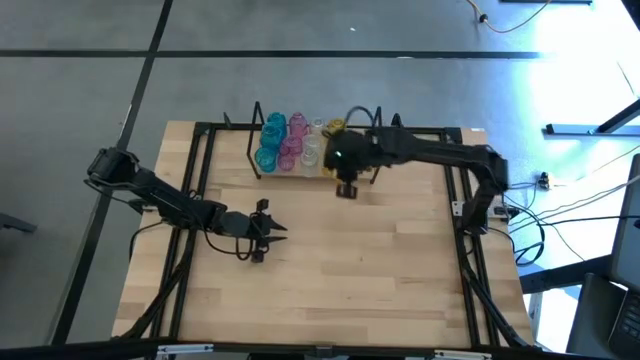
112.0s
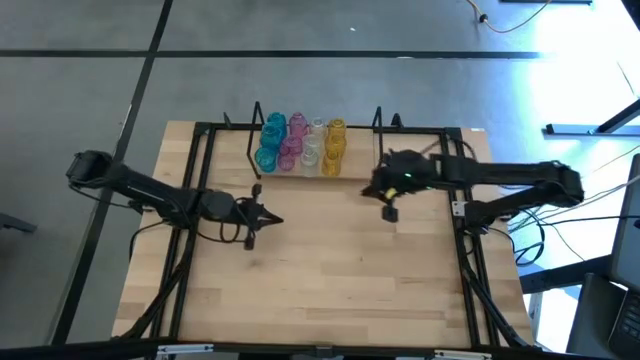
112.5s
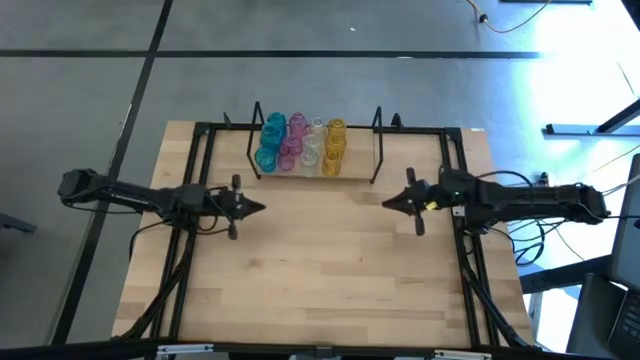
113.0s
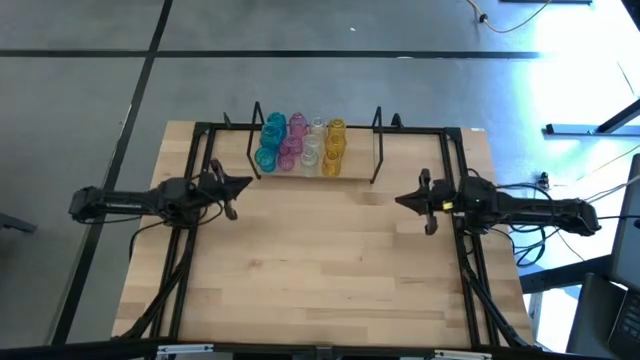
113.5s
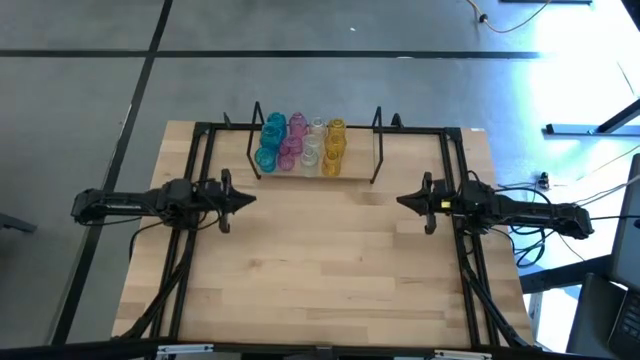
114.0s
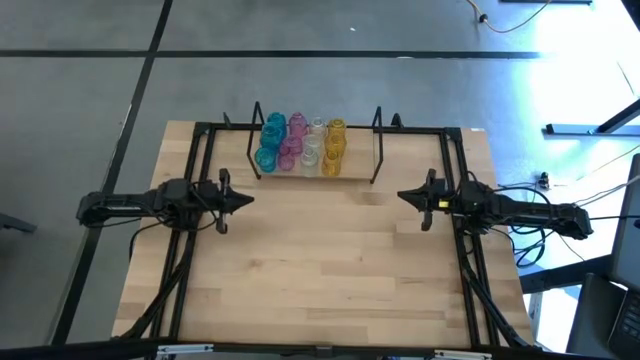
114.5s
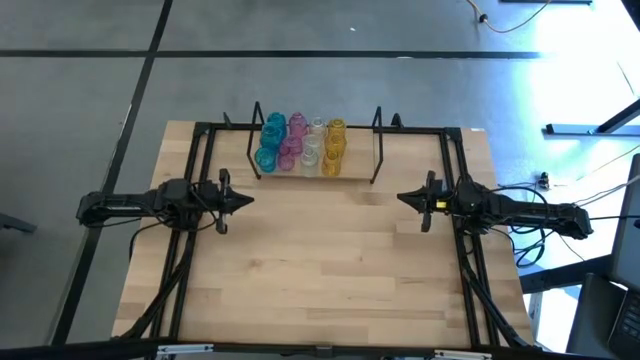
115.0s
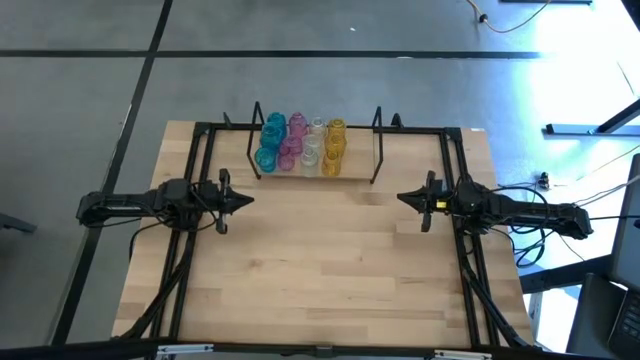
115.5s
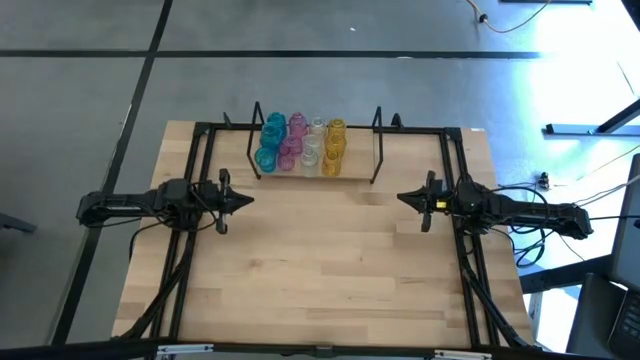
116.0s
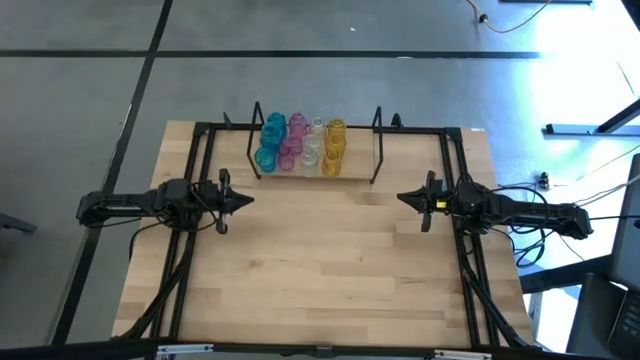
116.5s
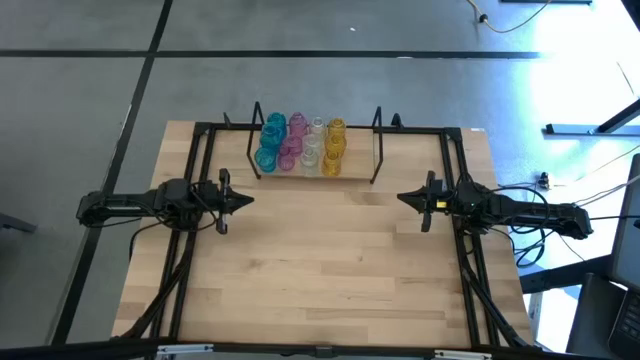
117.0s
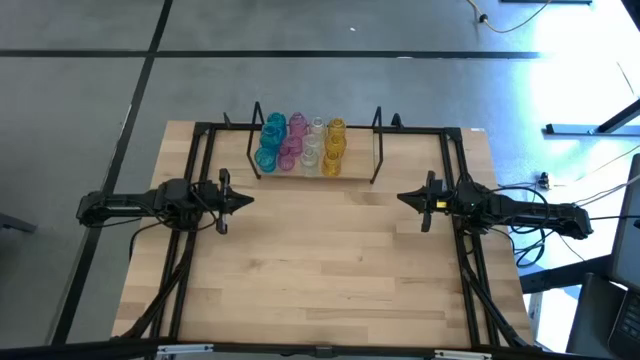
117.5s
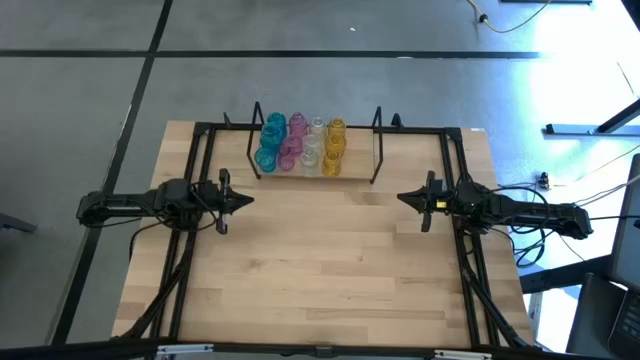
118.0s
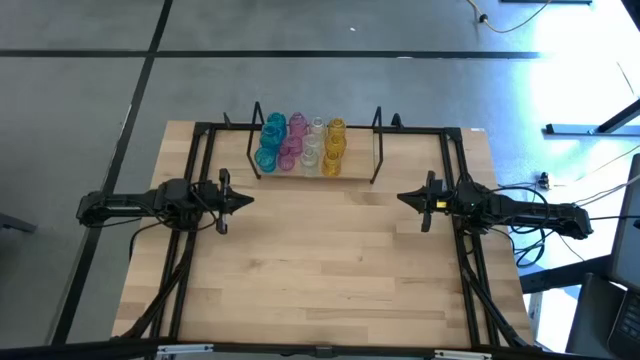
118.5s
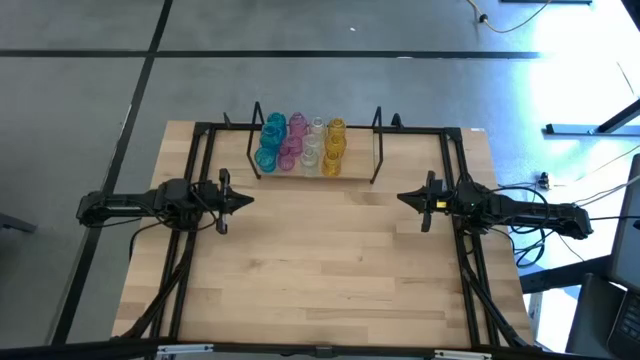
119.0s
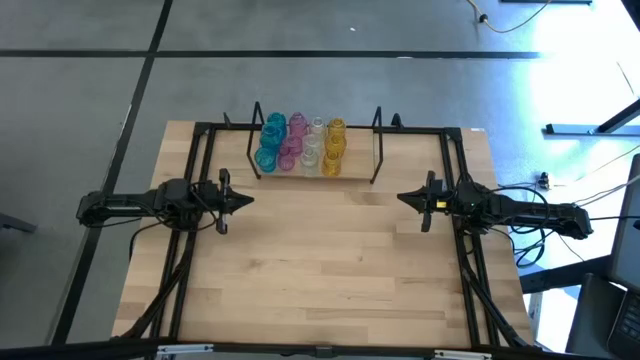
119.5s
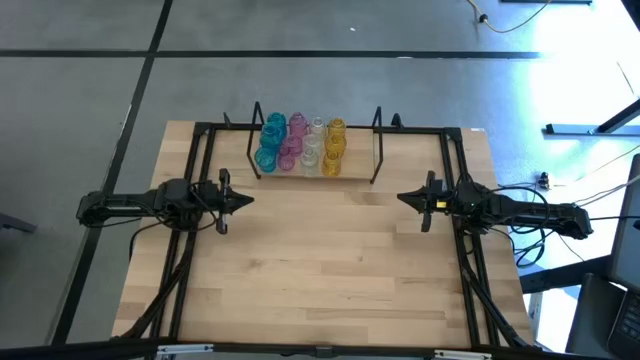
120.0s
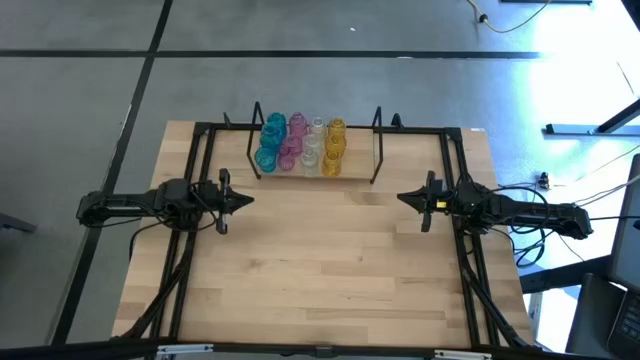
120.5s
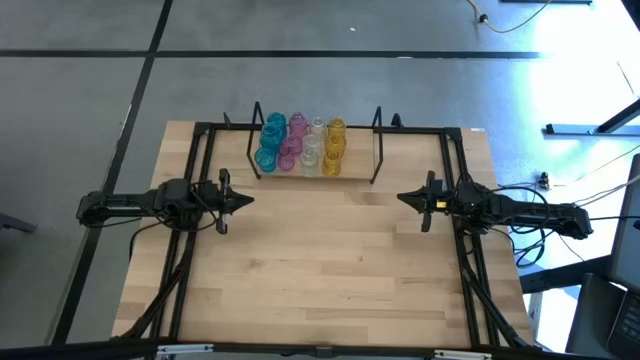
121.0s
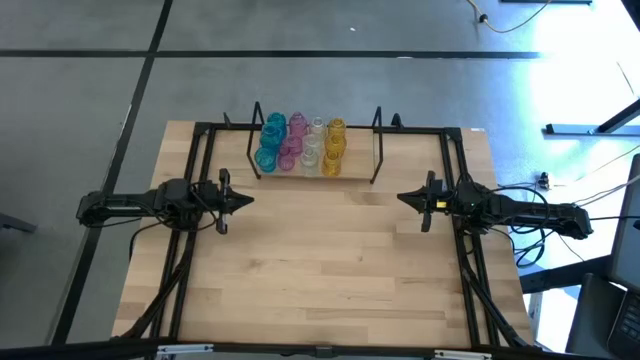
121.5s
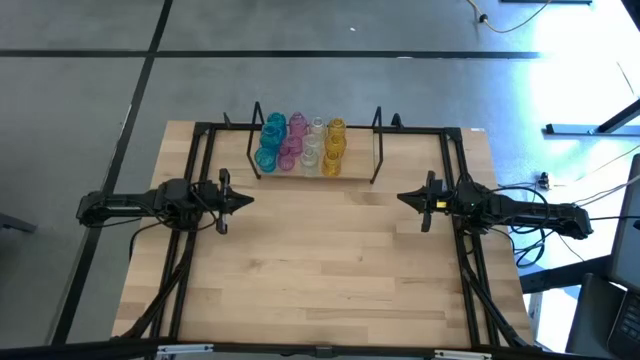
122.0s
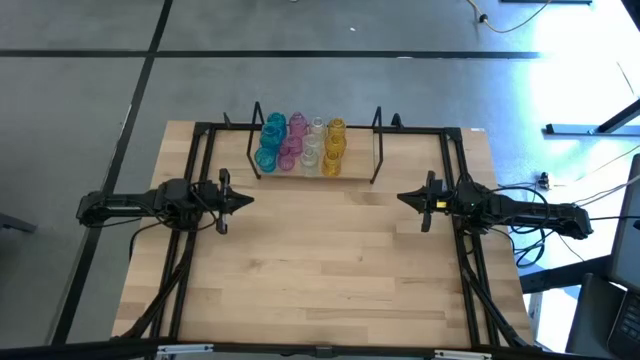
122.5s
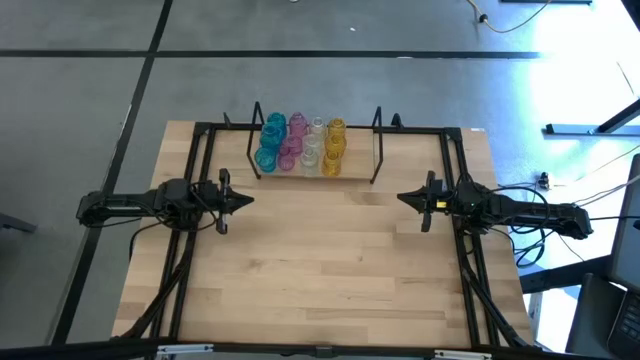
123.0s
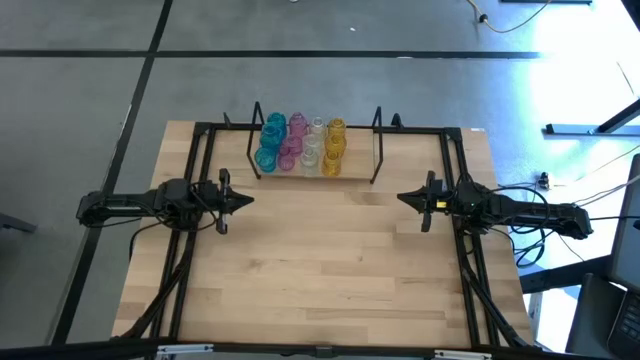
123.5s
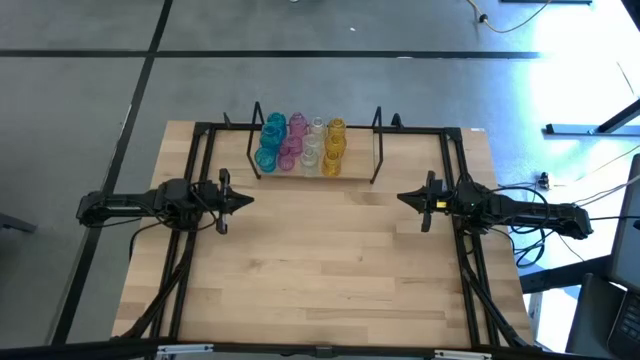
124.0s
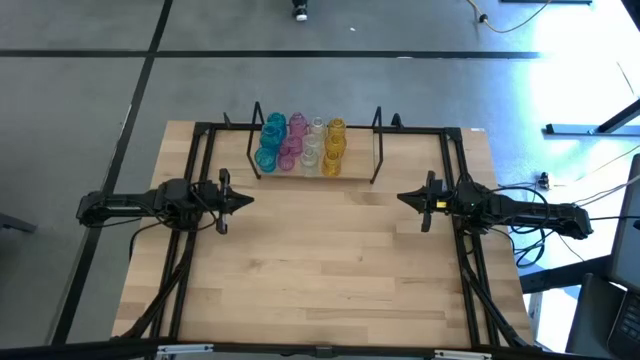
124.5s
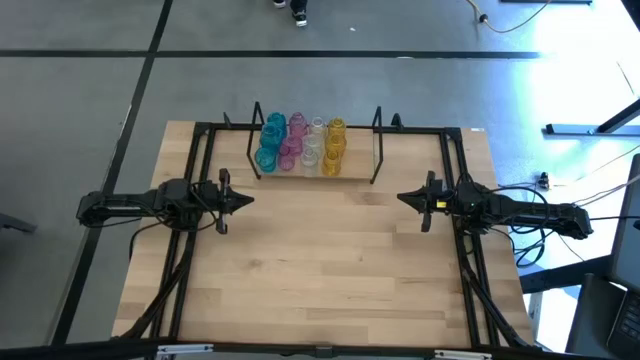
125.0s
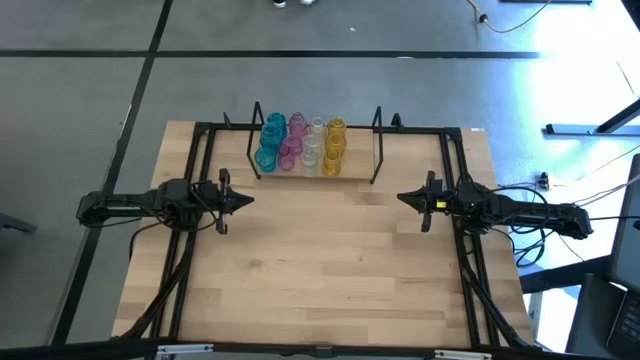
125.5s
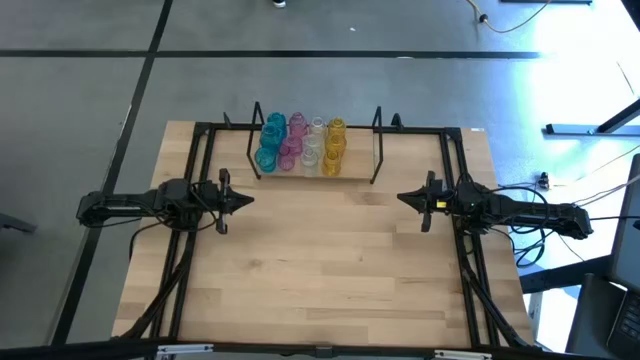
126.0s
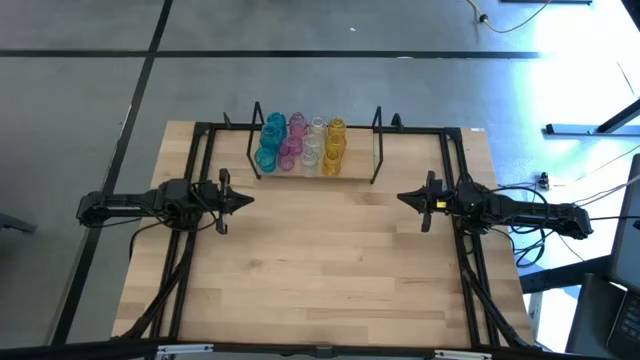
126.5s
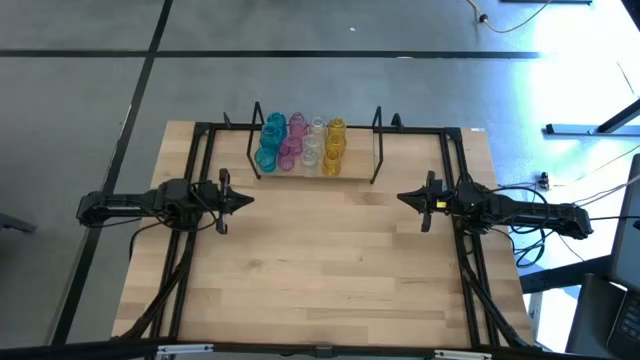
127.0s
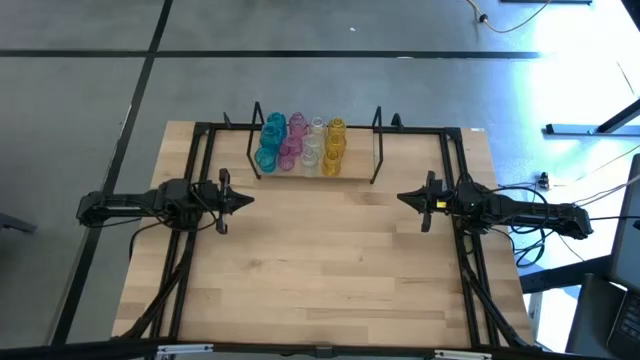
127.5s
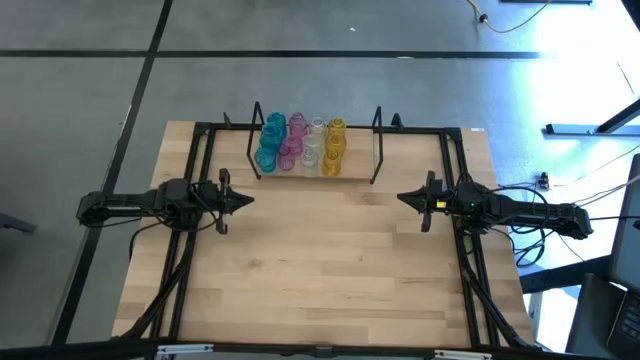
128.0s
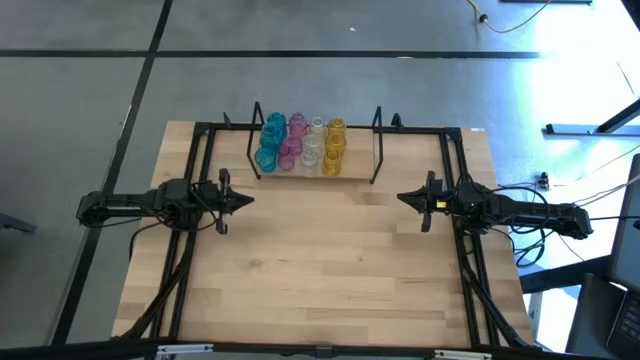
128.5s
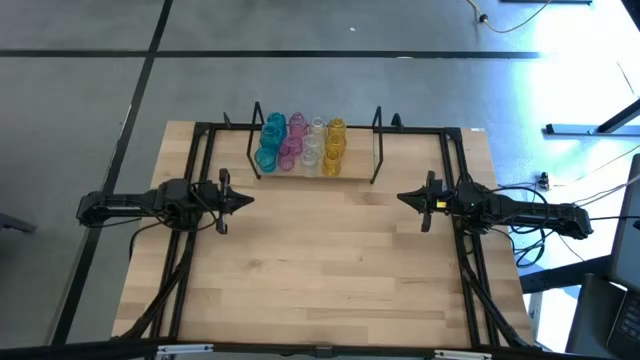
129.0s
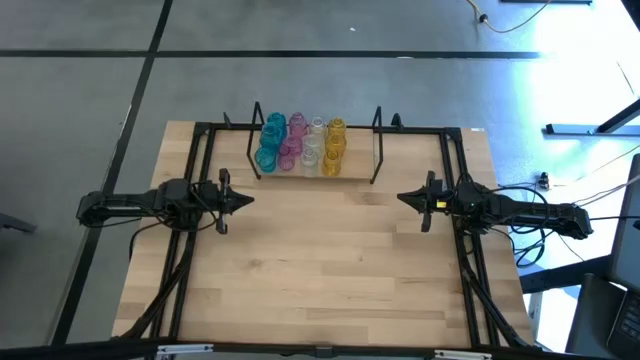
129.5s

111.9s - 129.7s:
Task: sort vases onto shelf
Return to Home Position

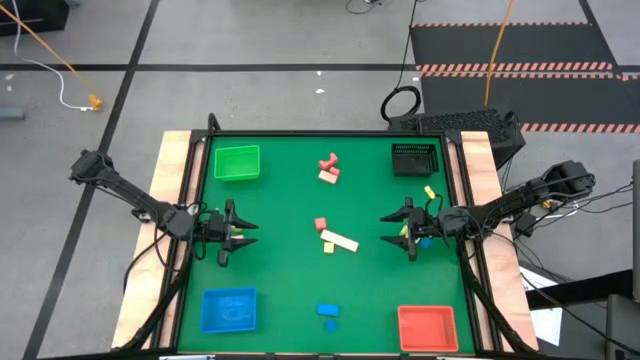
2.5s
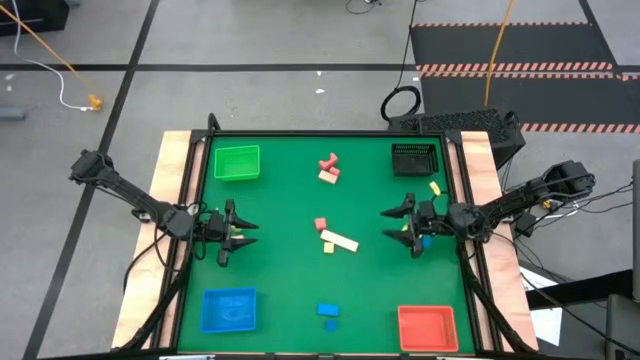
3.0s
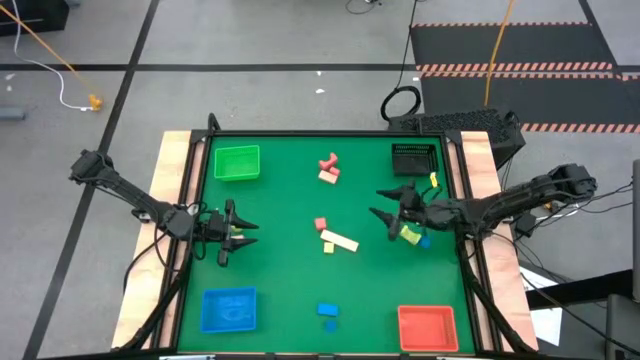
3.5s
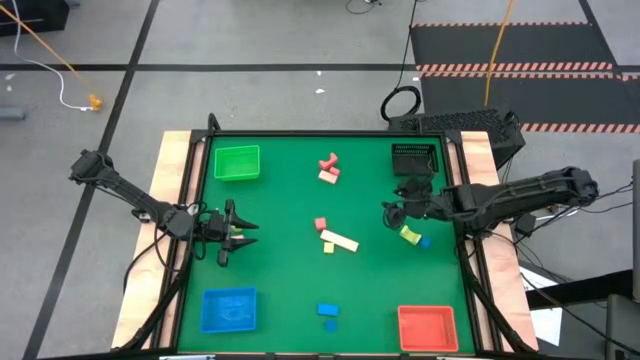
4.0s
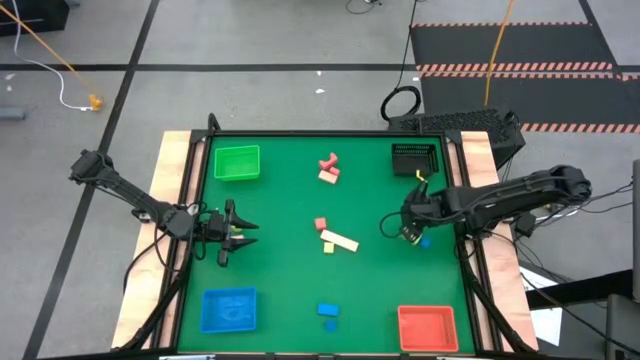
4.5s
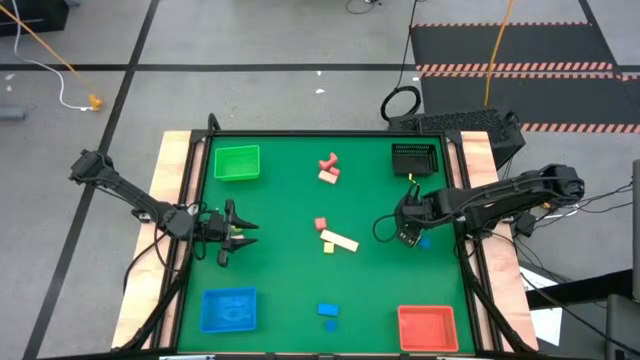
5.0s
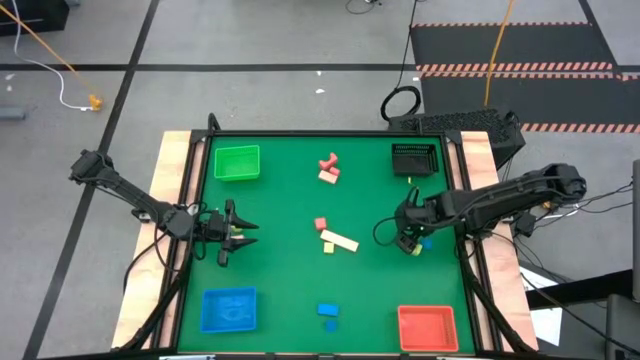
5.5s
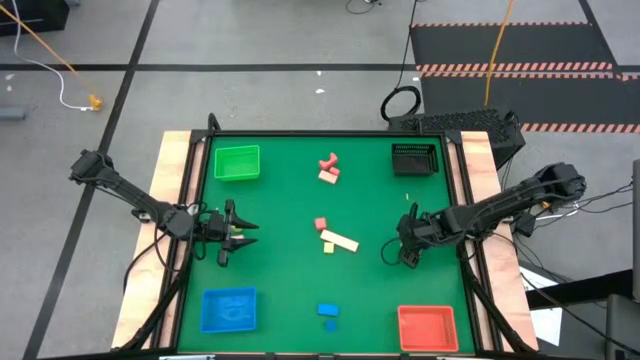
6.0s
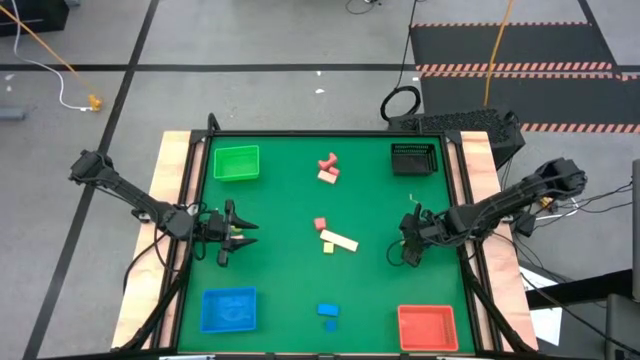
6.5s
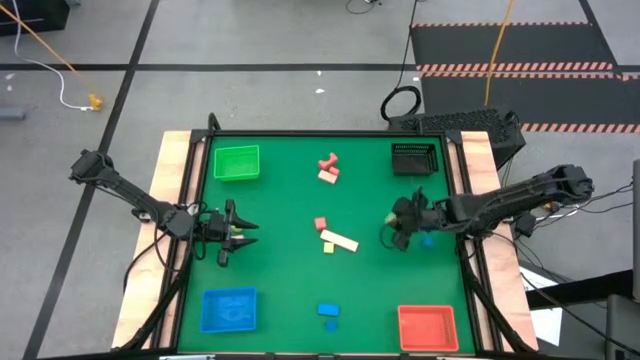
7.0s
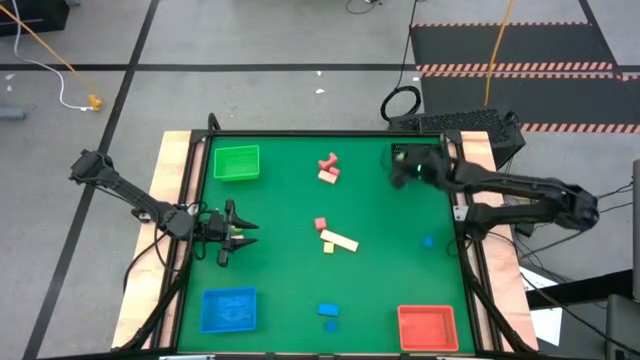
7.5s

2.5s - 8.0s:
Task: Sort & place blocks by color
Put the right green block into the black bin
